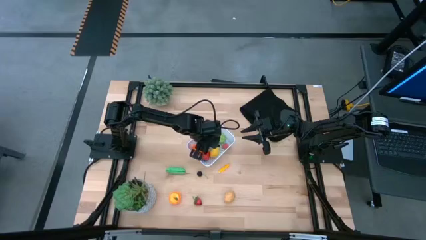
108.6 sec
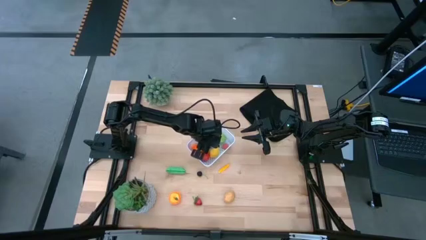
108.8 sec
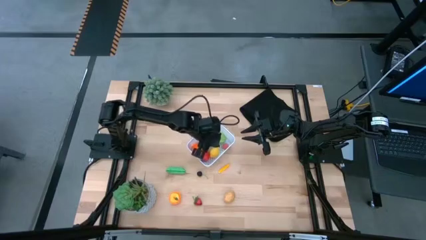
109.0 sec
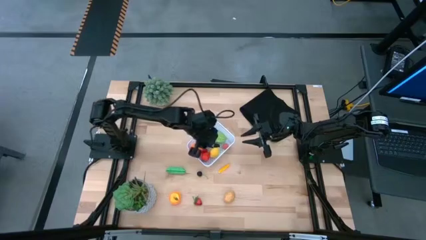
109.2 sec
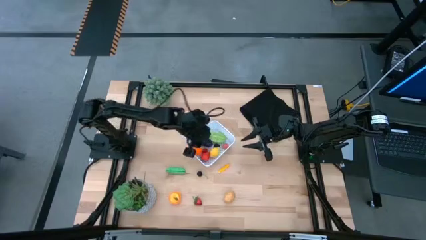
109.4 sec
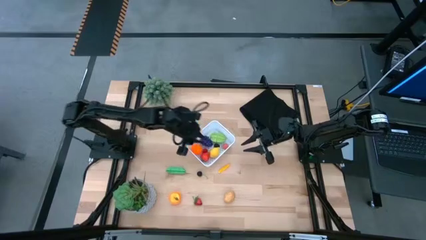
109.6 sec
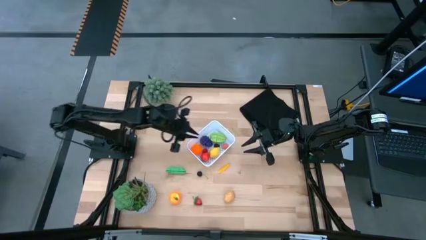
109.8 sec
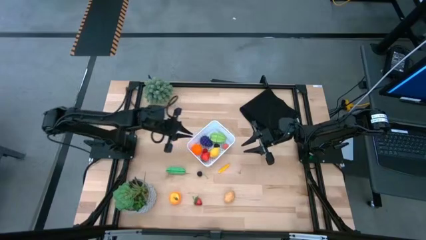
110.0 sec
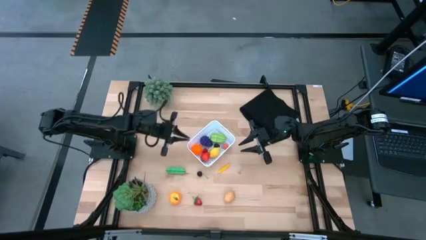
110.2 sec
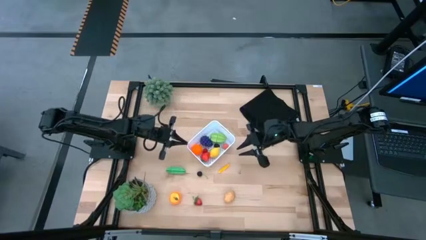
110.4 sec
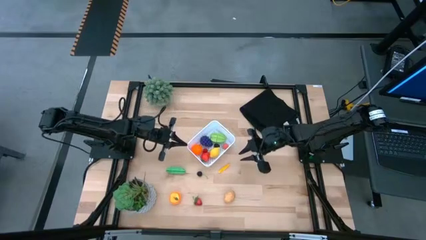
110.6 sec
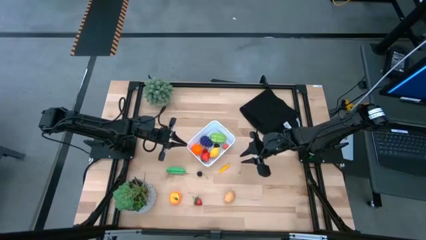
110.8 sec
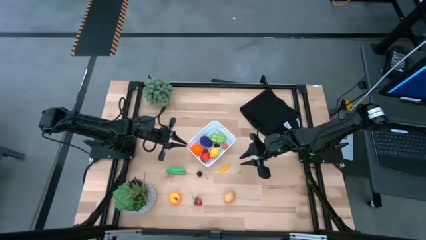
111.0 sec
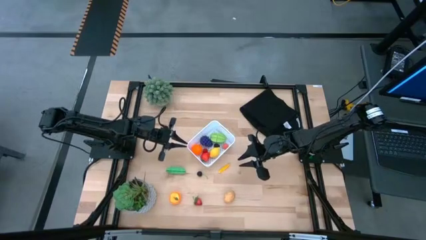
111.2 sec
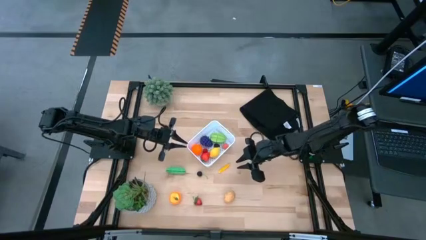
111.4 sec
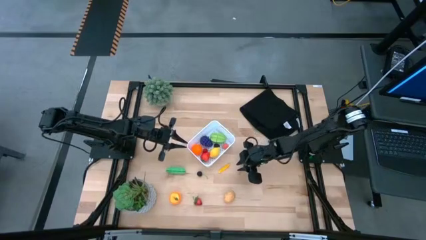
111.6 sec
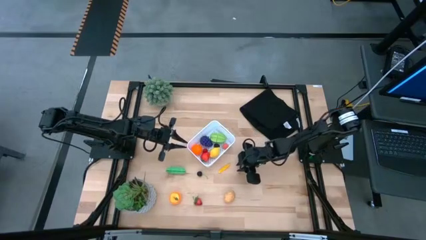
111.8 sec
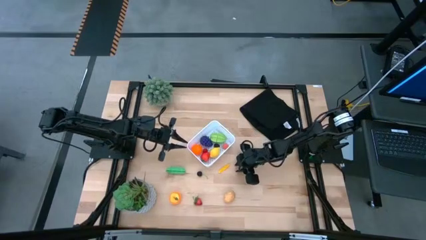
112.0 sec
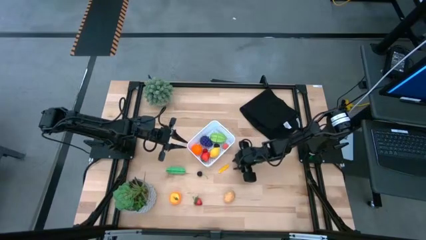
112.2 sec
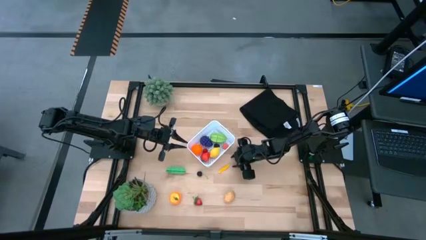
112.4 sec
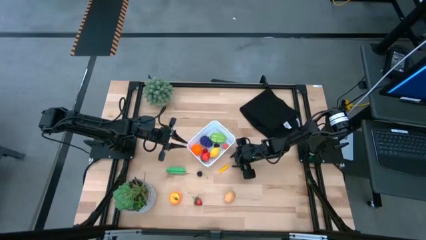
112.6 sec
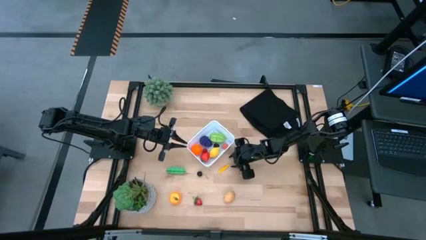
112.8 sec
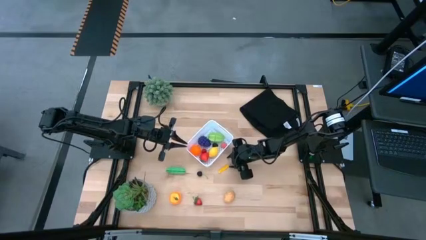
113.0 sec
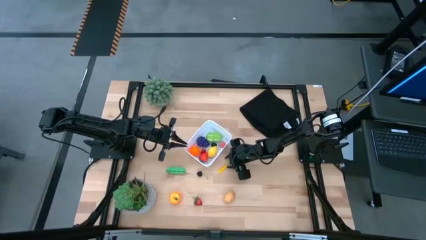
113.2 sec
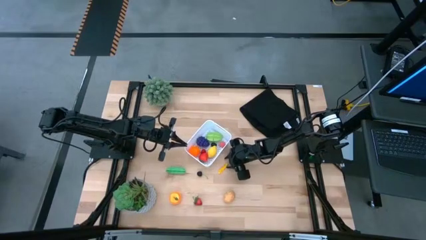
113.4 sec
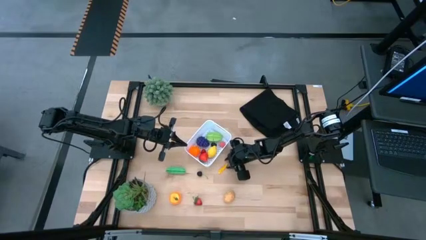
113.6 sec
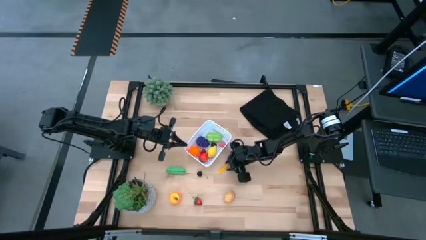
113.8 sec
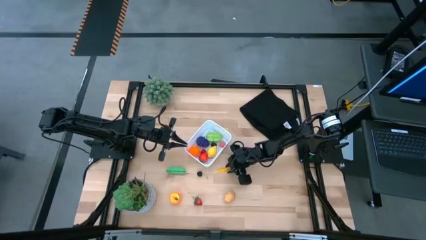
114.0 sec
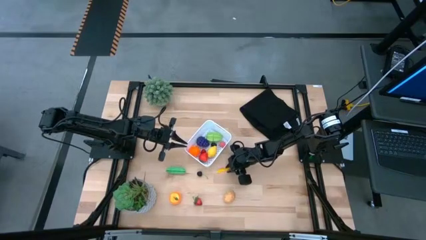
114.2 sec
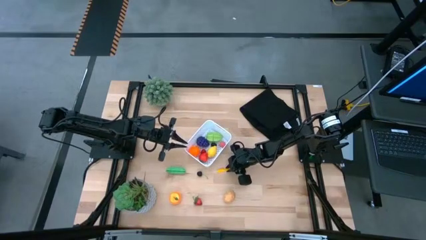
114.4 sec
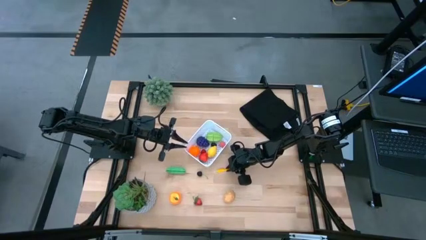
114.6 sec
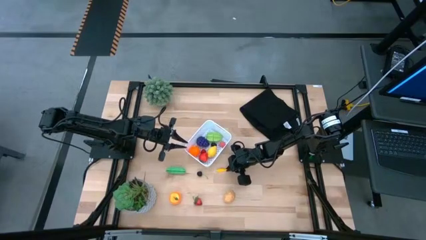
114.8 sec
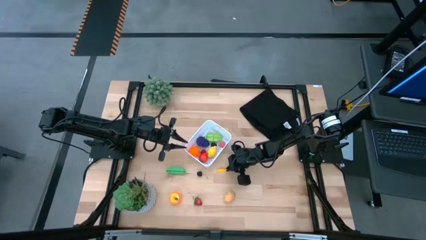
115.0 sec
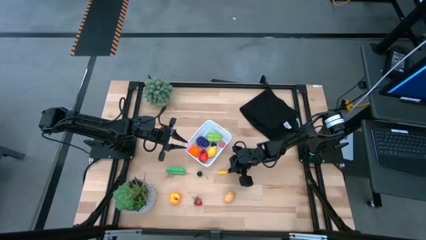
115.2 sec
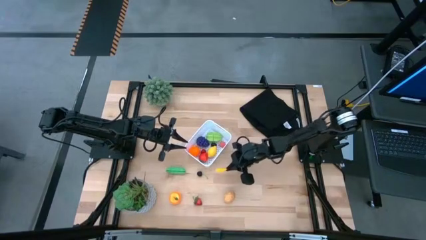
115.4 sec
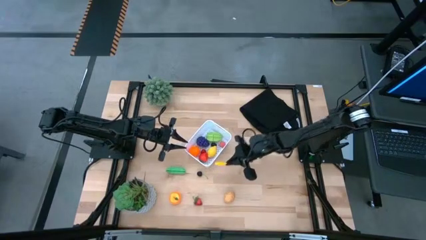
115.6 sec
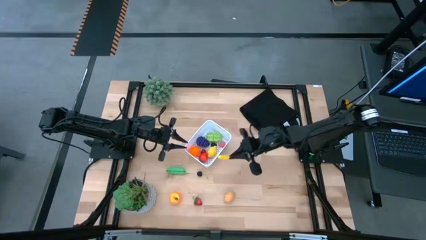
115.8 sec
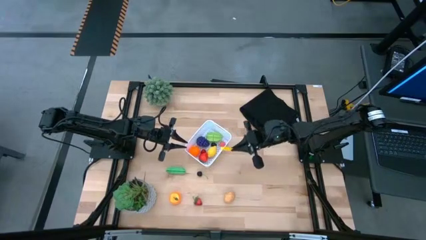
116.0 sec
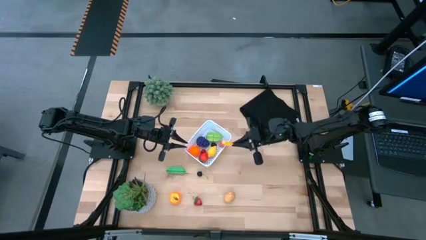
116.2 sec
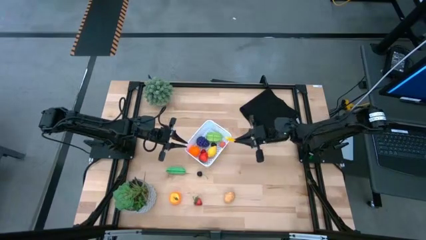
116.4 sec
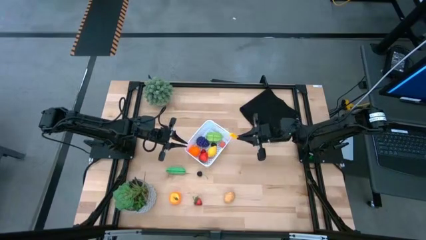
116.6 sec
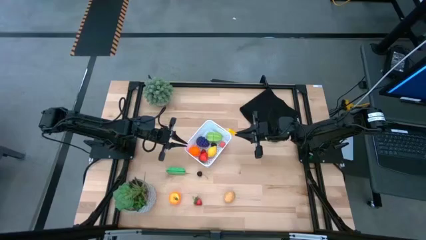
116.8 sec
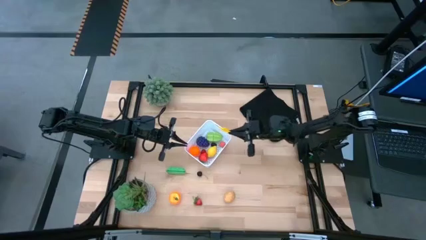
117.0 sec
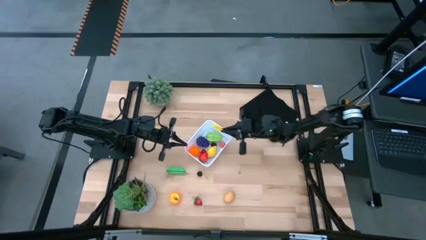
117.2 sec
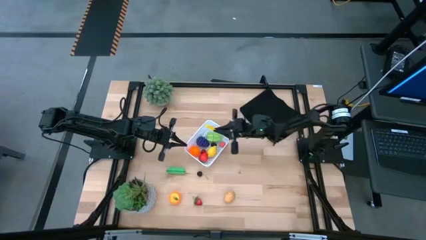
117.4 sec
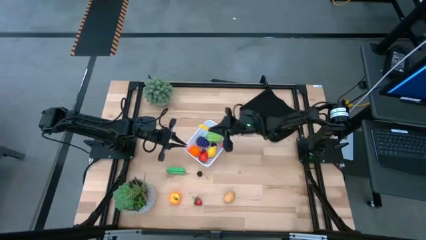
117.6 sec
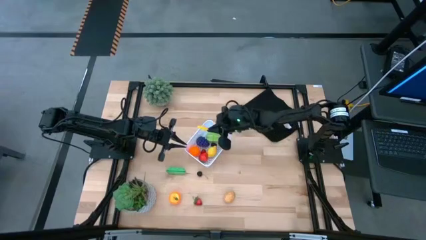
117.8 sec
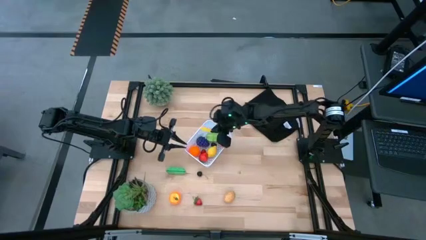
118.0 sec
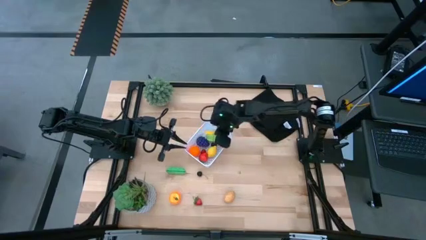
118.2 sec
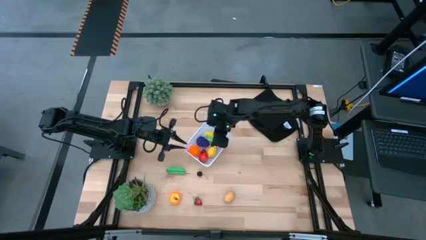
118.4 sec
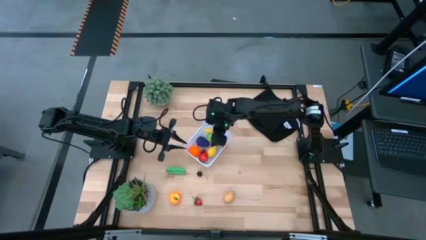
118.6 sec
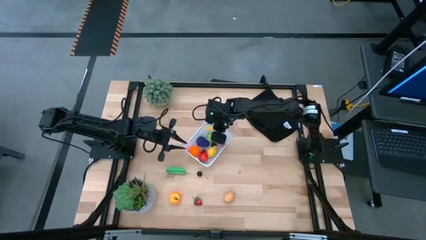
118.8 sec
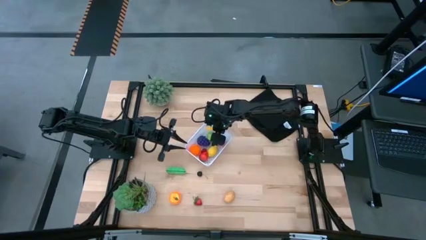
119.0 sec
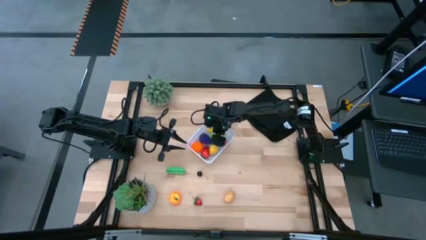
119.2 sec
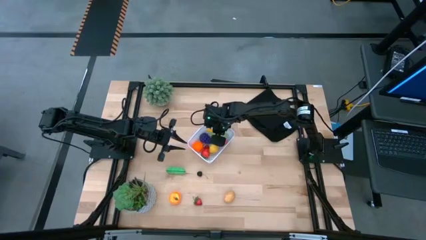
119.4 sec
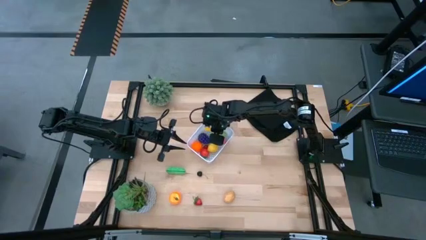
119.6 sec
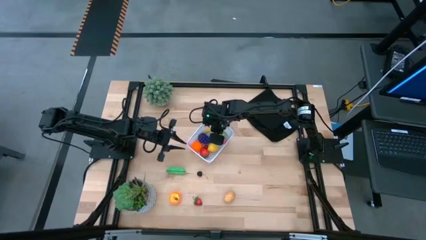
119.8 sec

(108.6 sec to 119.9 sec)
Task: Pick and placing Produce into tupperware
Put the corn into the white bin

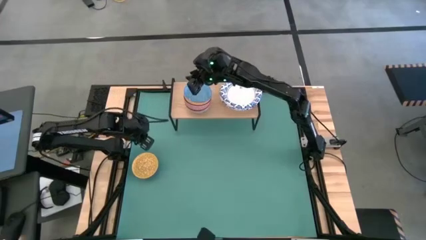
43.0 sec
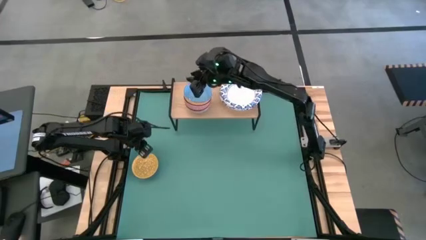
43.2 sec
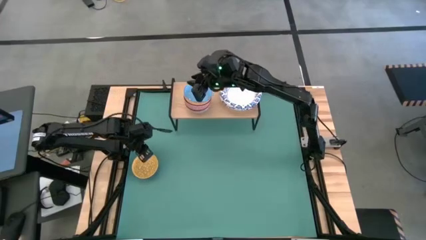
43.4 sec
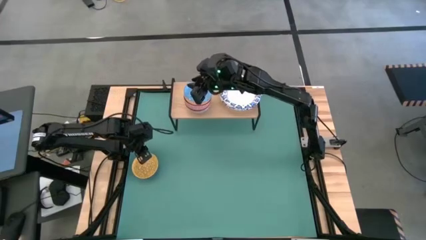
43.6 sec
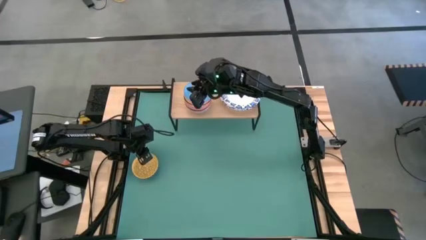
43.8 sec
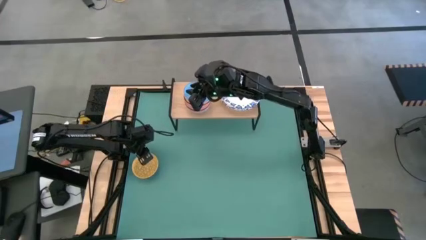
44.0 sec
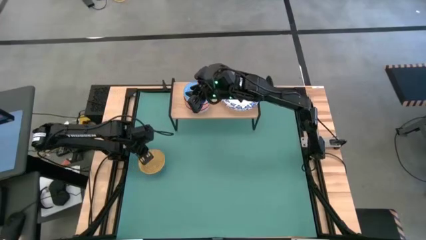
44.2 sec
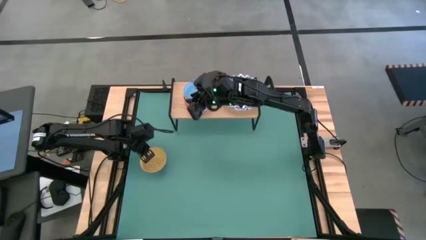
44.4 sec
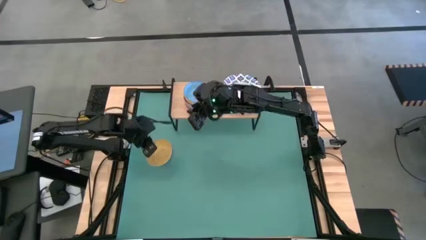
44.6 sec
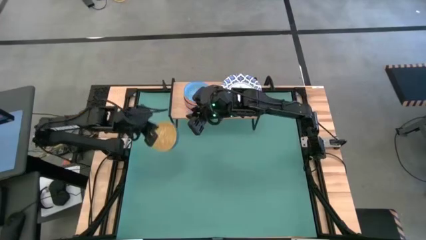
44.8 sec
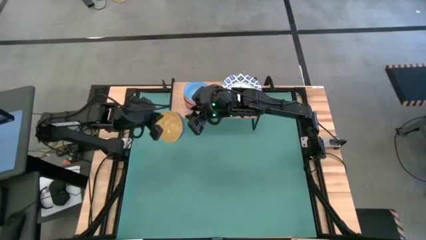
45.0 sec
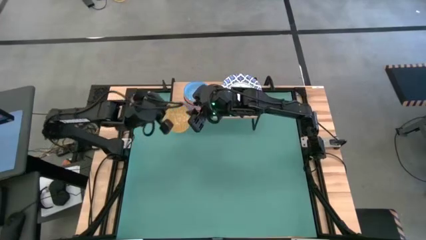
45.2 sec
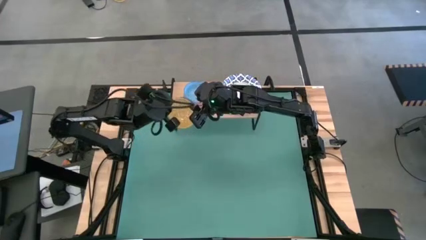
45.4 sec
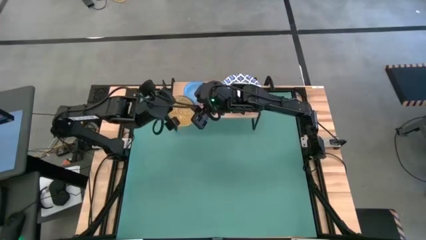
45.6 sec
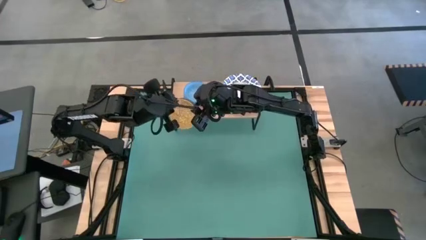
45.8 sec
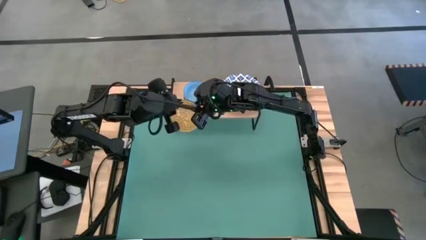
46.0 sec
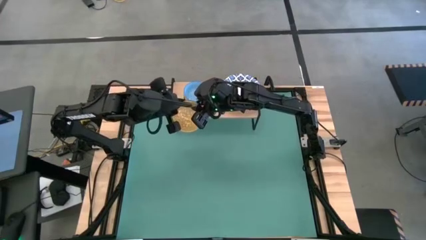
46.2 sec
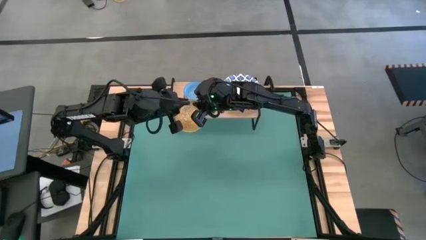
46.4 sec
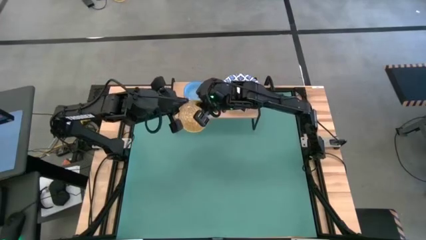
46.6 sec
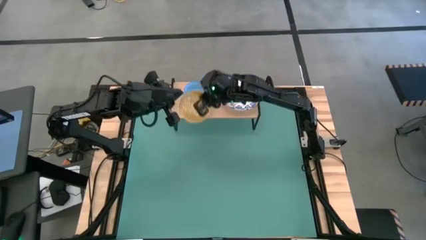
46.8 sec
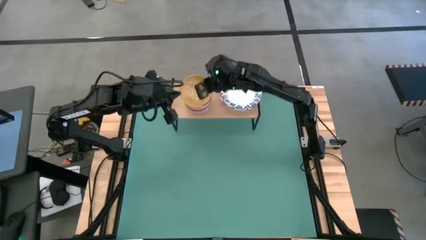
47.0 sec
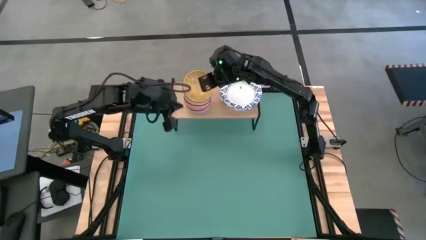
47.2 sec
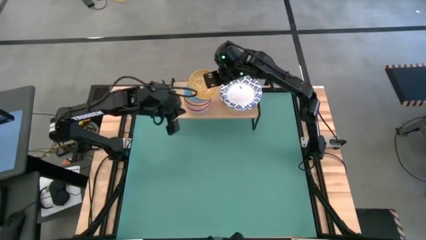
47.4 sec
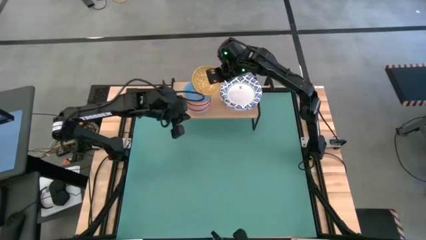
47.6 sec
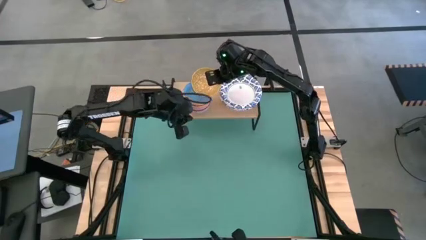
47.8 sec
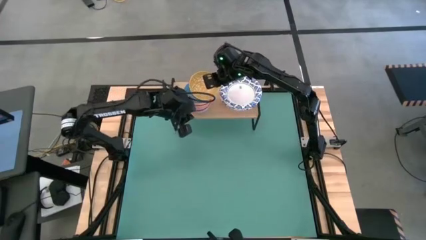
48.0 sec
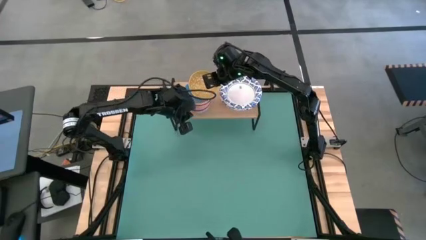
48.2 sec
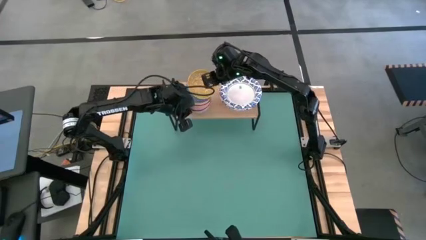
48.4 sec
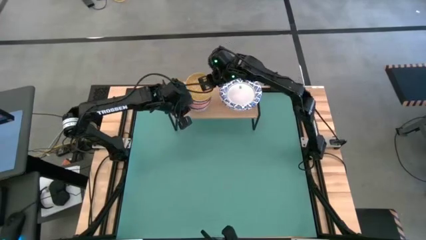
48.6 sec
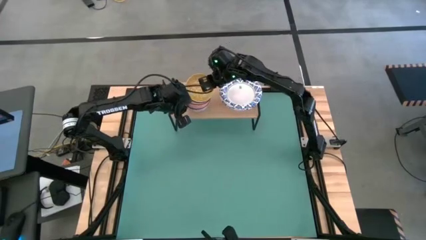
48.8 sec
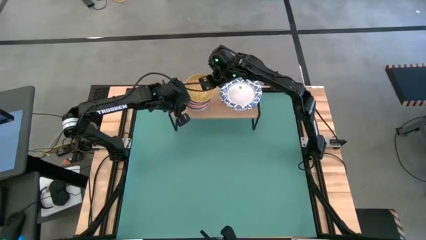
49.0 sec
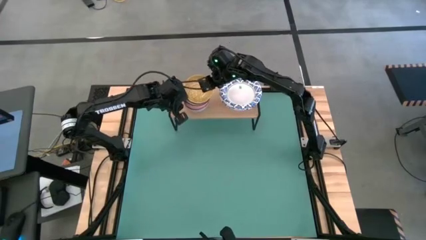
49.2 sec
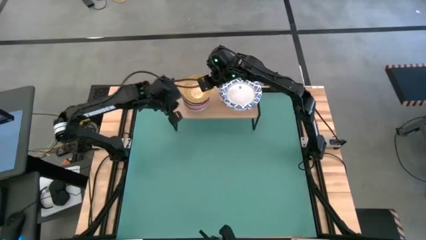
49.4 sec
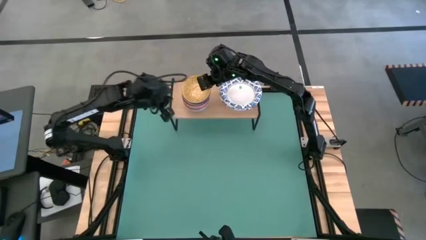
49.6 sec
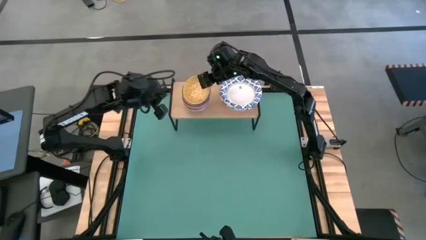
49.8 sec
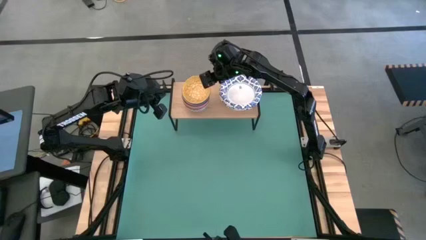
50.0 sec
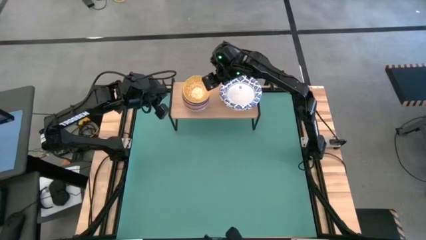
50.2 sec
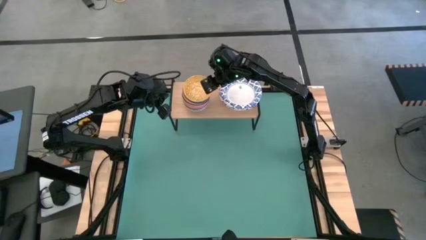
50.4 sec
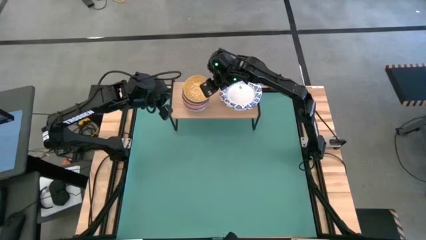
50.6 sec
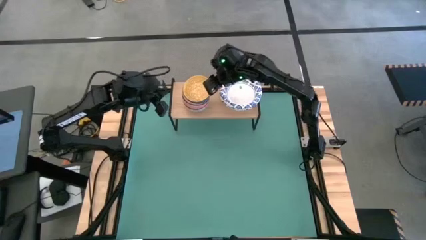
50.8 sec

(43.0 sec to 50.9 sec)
Task: Place and stack bowls onto a shelf
Stack the yellow patterned bowl on top of the light blue patterned bowl on the shelf
